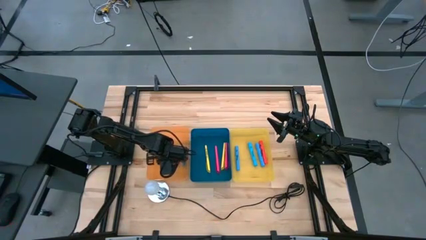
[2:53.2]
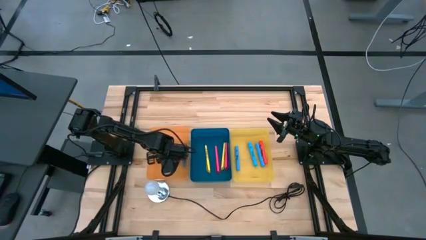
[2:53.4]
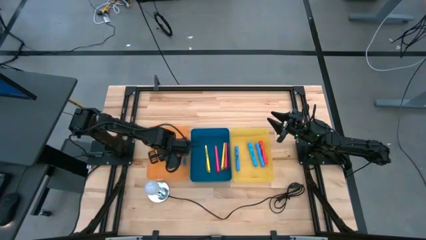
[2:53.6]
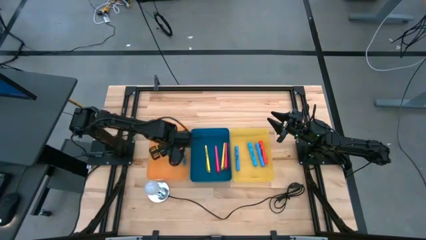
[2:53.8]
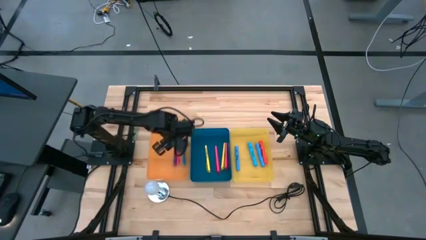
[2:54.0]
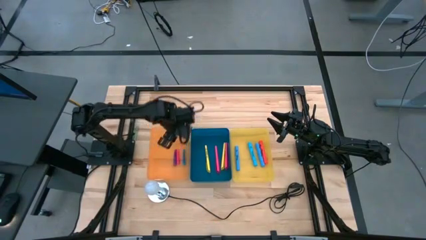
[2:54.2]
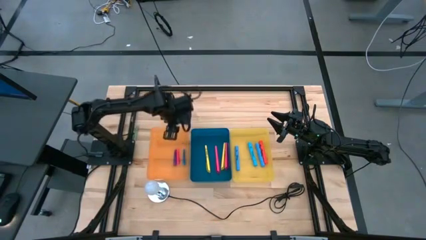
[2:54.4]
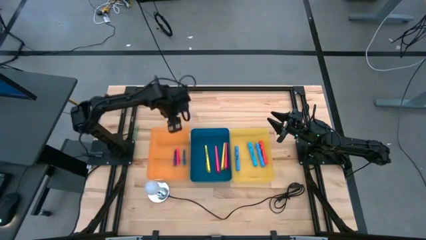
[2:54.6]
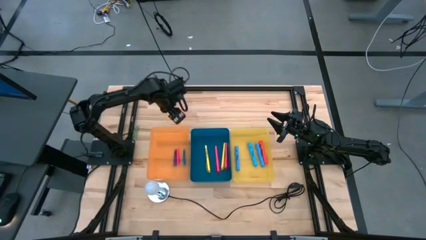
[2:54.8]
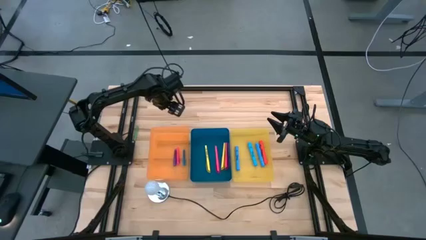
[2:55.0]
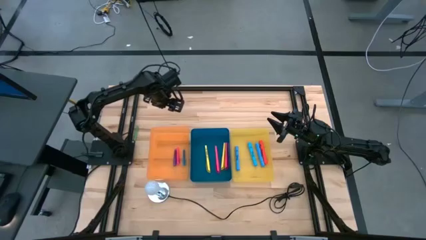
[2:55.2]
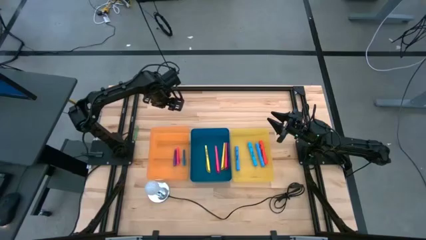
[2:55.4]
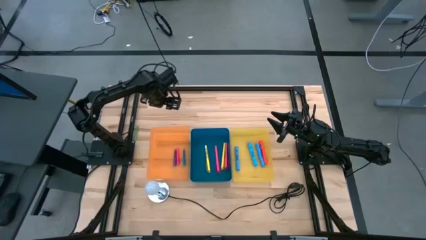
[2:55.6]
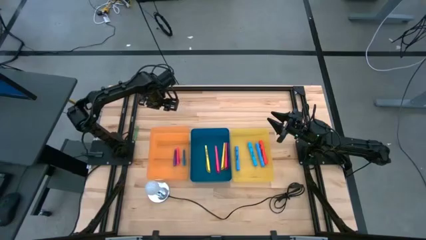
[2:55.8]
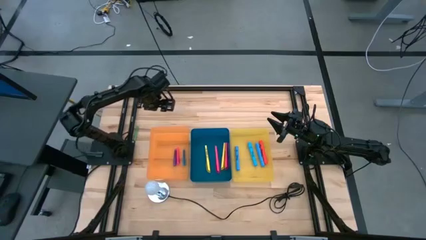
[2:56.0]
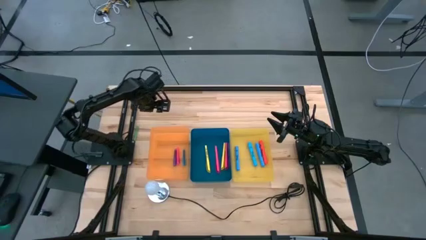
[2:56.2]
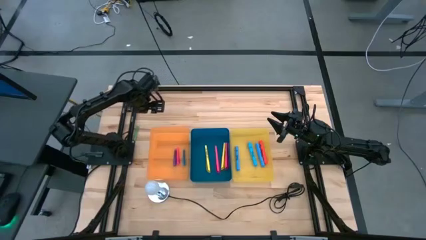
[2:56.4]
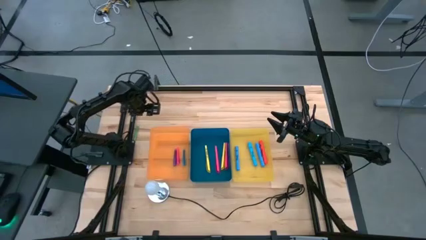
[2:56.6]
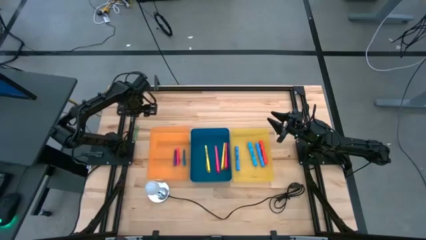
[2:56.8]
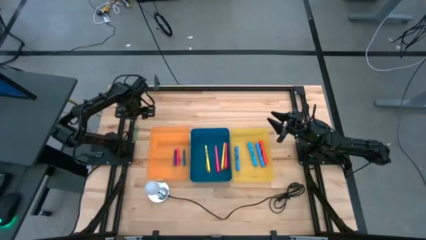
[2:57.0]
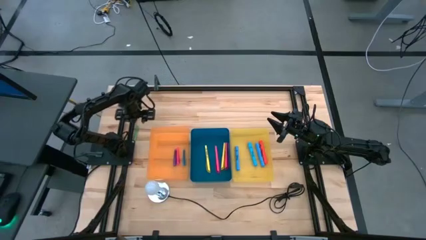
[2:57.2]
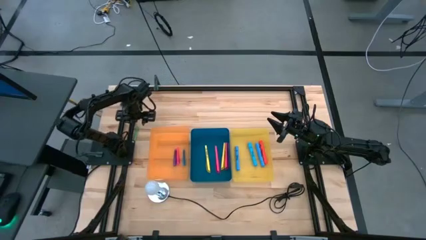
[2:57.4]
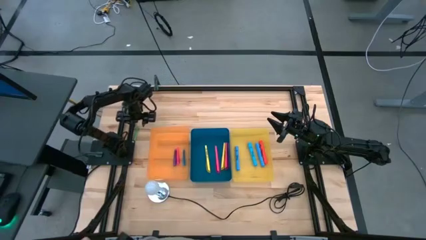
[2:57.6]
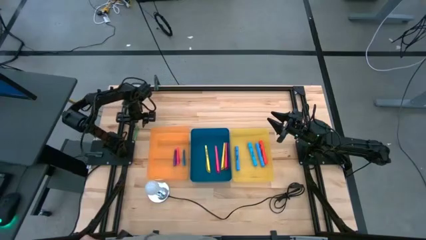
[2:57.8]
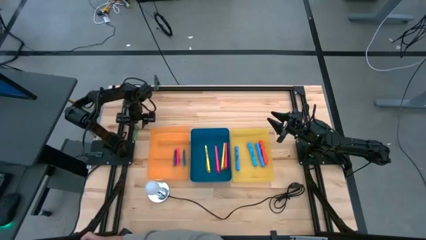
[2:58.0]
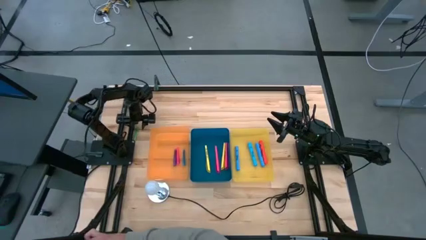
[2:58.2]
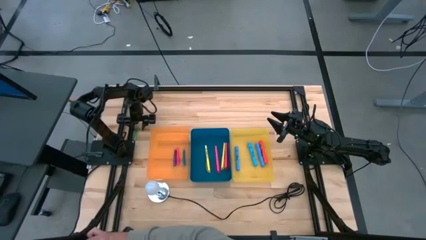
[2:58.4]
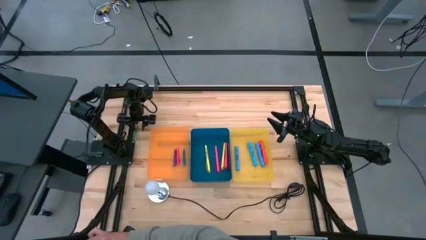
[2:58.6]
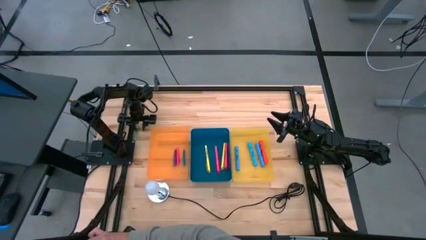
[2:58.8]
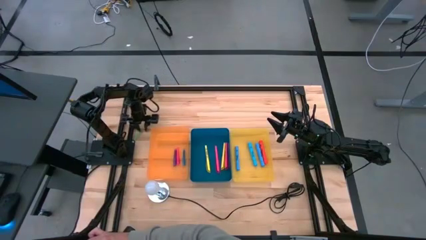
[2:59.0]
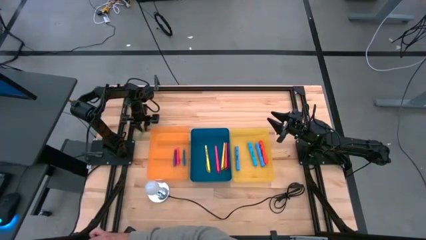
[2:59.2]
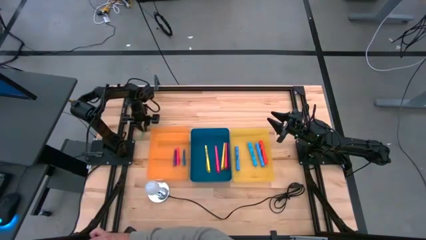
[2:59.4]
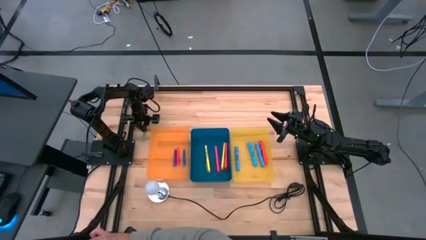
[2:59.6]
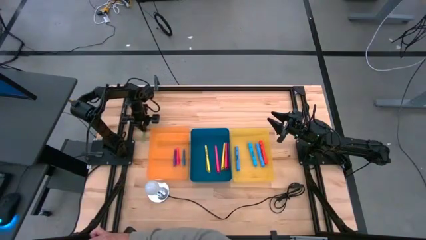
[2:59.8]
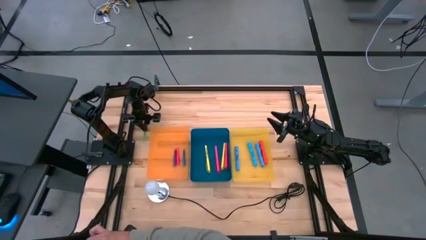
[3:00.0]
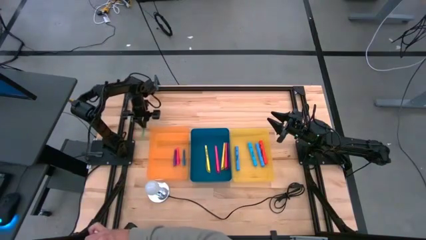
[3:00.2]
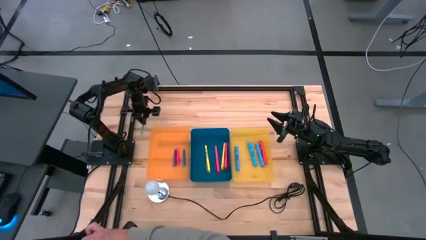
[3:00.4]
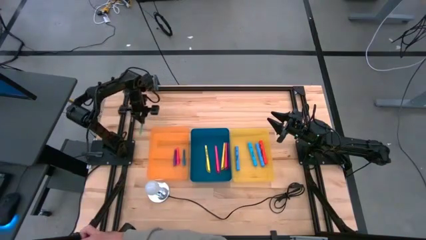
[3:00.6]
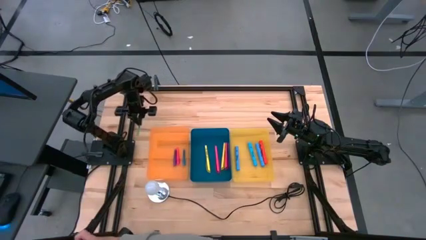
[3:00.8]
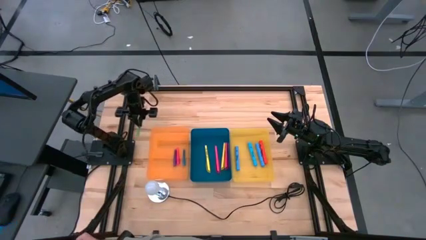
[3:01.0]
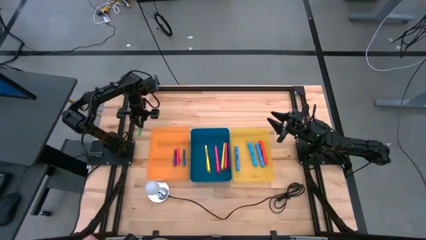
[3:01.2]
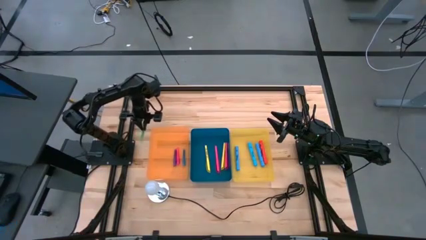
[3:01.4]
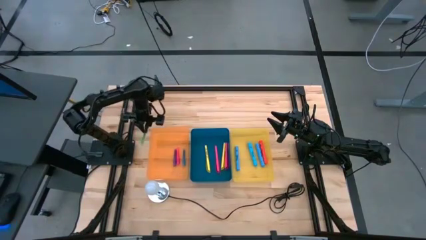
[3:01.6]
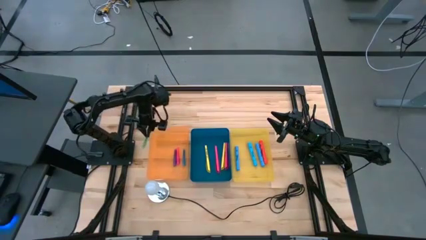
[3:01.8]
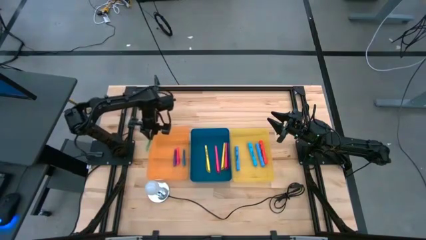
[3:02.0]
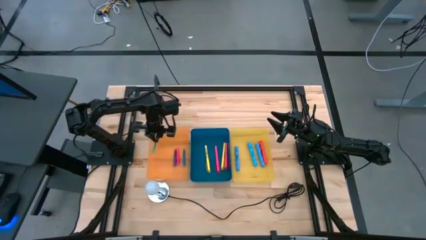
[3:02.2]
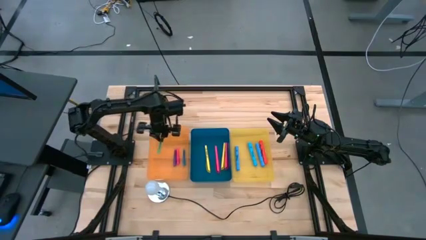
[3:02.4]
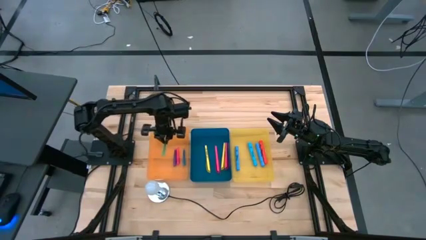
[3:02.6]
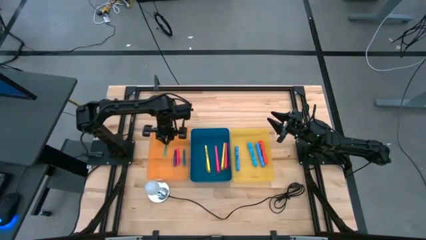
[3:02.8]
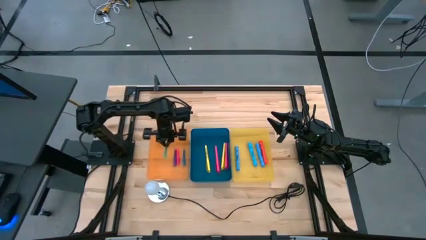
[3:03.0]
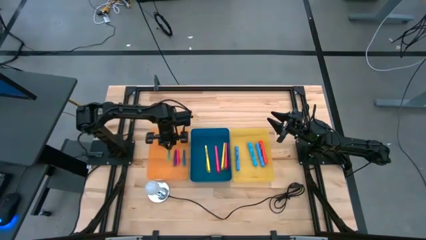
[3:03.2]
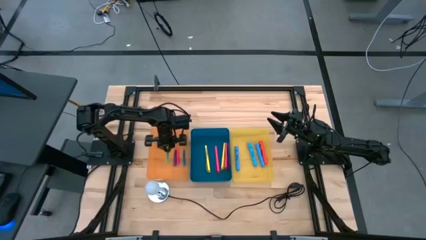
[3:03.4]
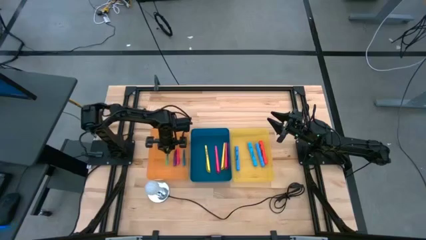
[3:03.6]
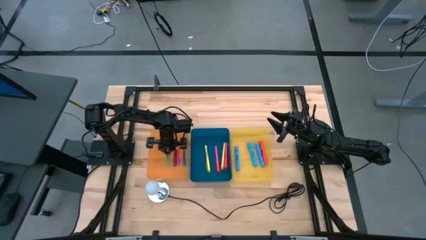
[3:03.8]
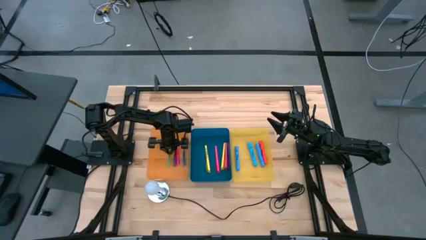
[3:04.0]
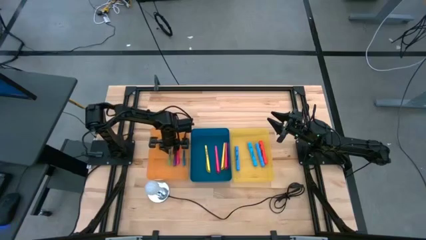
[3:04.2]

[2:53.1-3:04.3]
Task: Pick & Place Markers
Put the small green pen into the orange bin

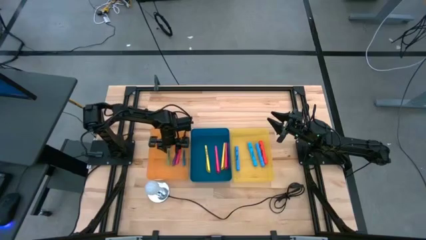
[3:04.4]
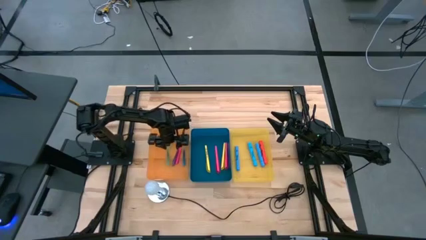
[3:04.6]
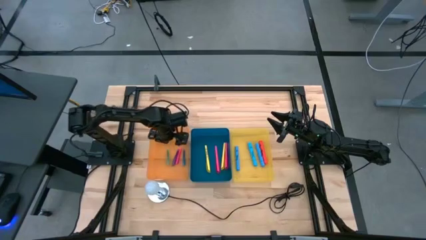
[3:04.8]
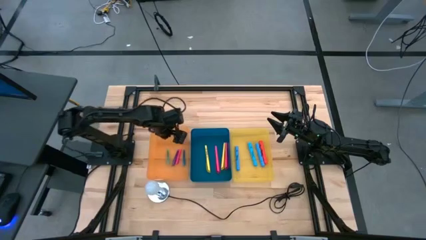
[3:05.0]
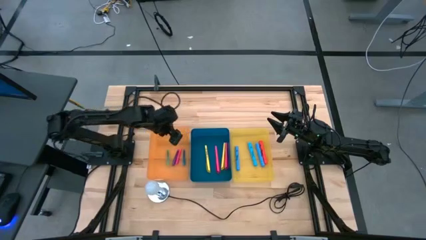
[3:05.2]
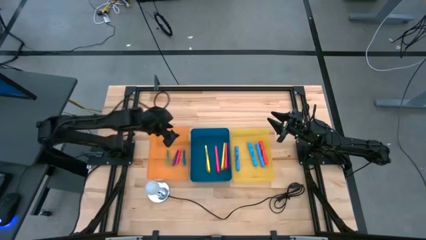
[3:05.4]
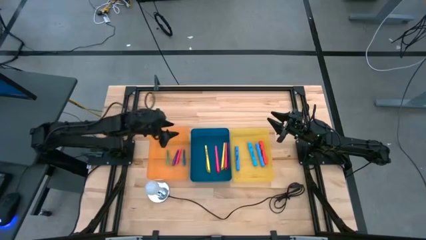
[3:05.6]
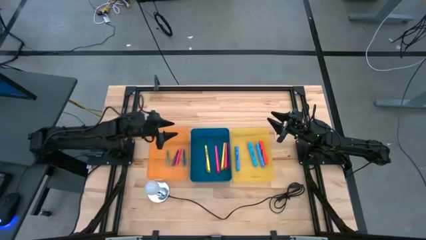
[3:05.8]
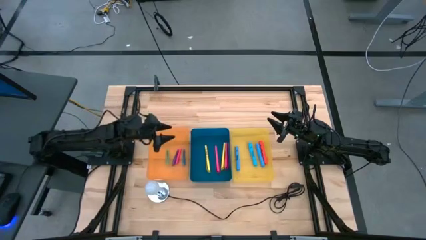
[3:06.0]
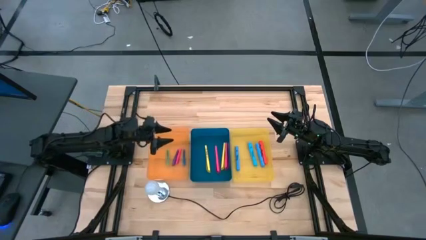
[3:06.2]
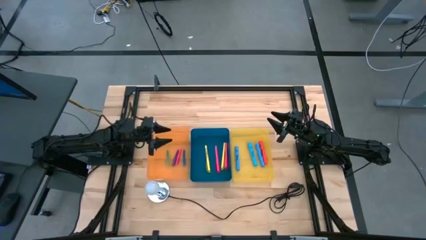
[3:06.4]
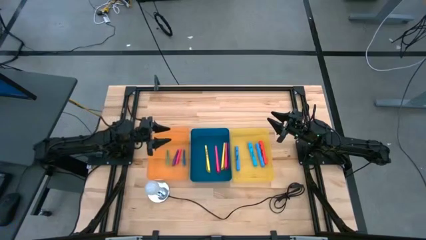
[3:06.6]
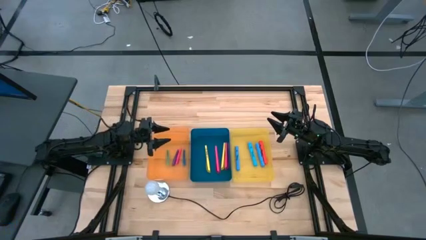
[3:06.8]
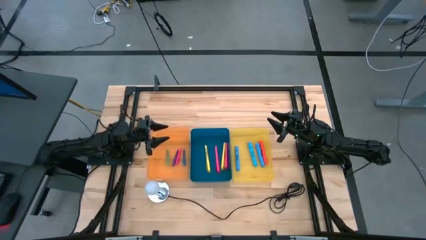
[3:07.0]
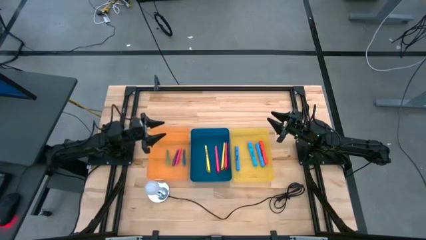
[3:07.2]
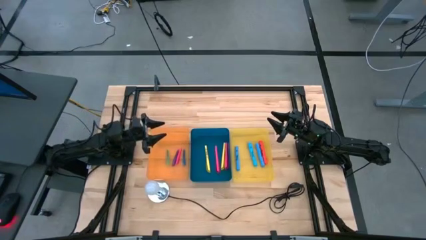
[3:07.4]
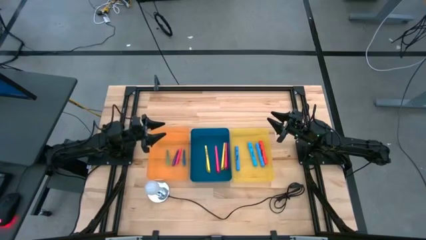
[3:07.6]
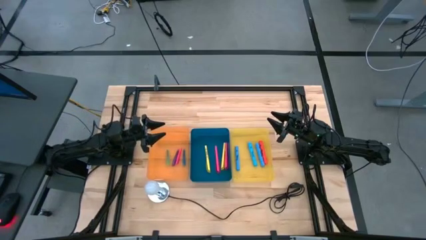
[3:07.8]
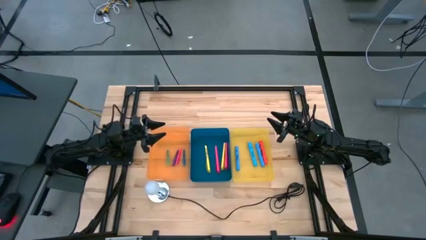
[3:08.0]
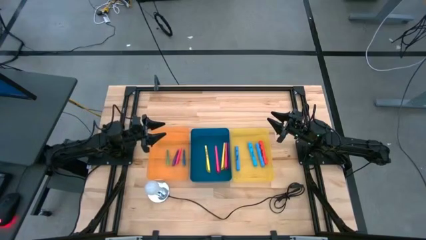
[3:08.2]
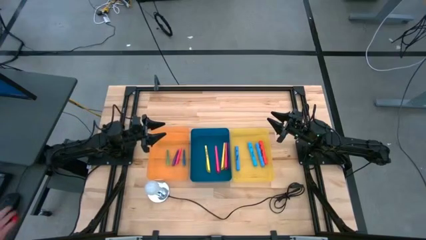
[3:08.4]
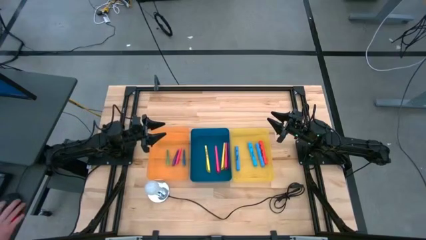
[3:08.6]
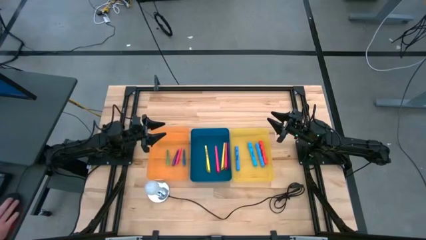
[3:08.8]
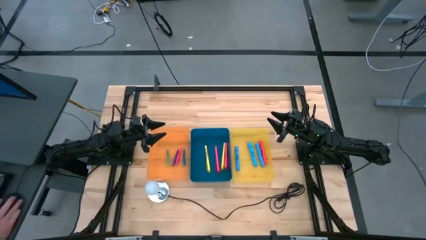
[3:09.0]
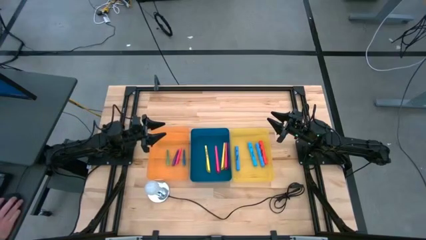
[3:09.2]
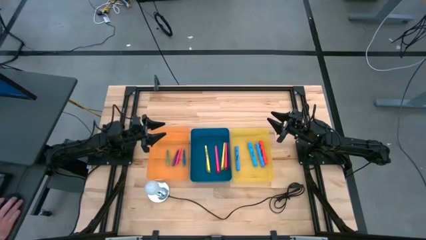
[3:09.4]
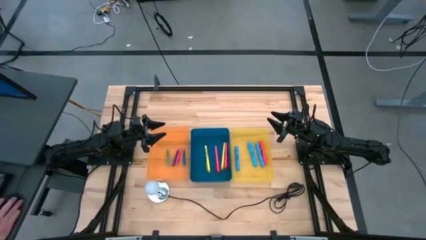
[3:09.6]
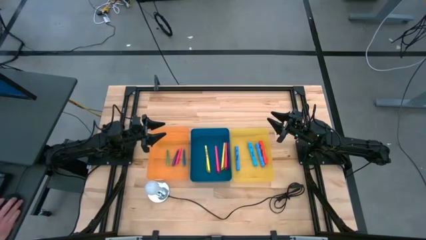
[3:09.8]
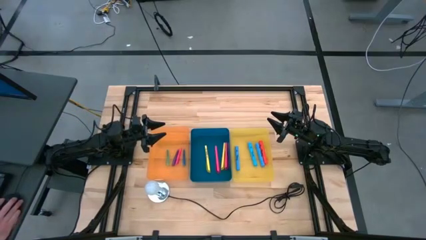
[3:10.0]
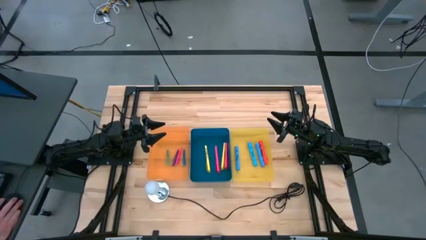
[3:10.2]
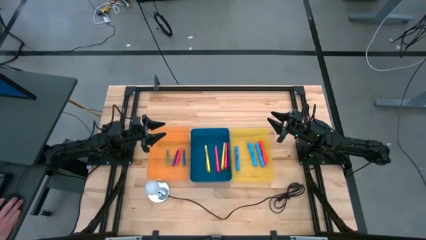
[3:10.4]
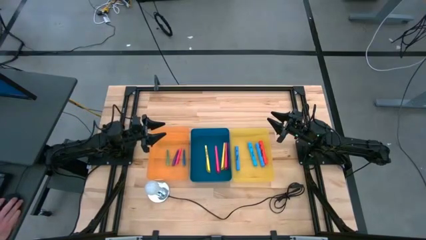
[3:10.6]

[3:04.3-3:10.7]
Return to Home Position
